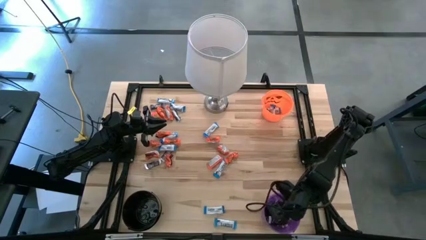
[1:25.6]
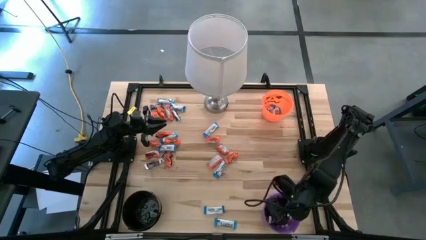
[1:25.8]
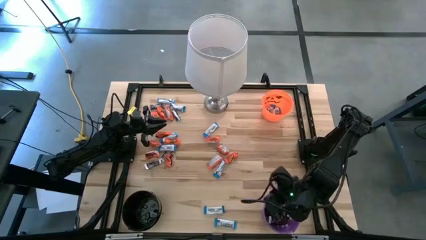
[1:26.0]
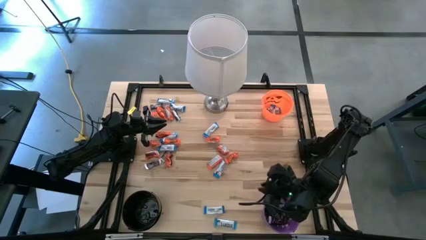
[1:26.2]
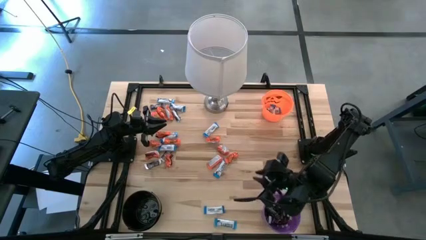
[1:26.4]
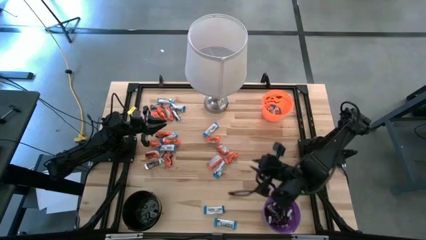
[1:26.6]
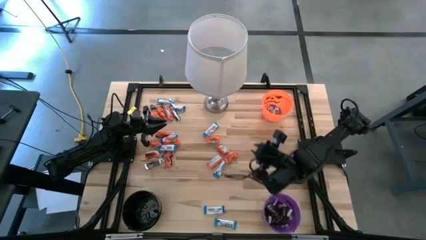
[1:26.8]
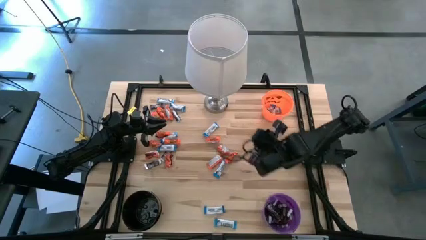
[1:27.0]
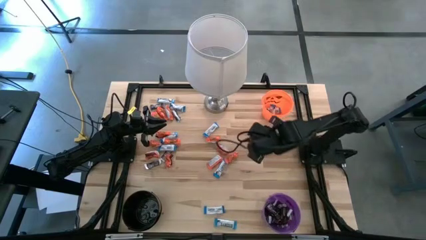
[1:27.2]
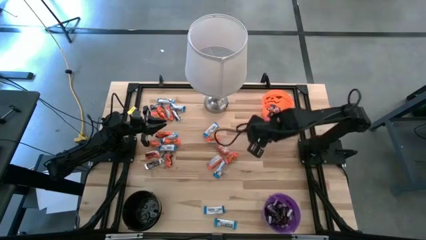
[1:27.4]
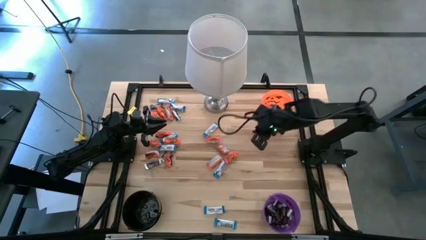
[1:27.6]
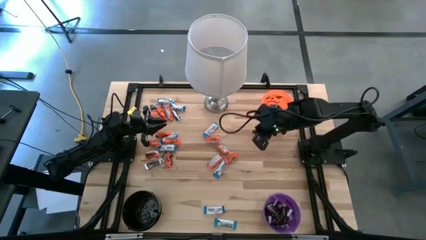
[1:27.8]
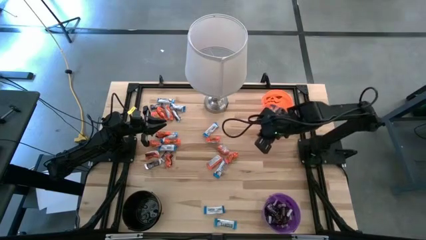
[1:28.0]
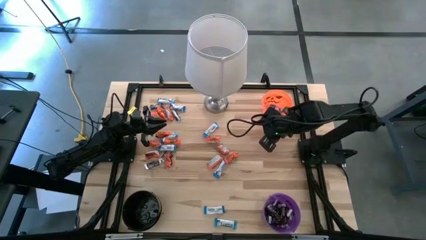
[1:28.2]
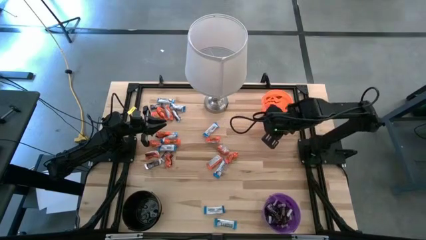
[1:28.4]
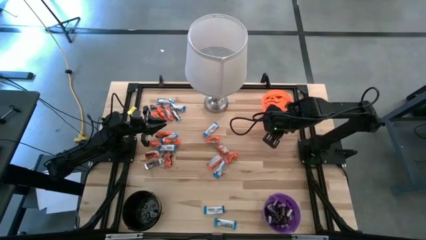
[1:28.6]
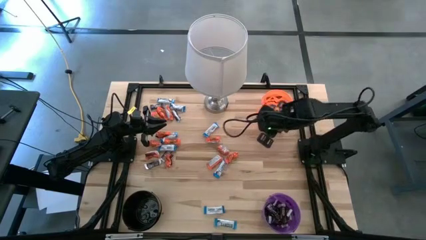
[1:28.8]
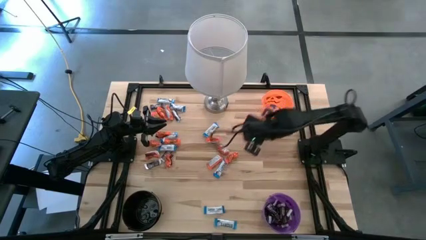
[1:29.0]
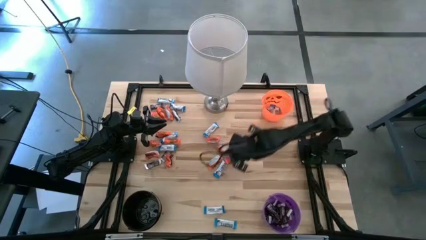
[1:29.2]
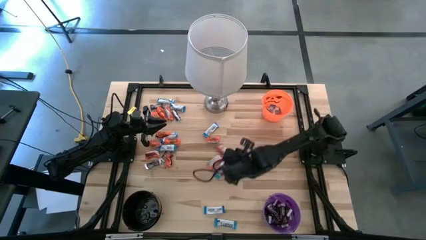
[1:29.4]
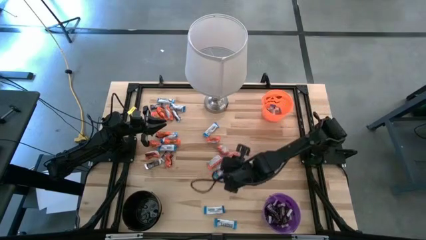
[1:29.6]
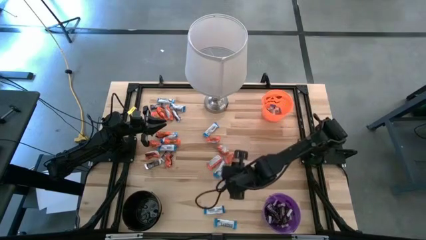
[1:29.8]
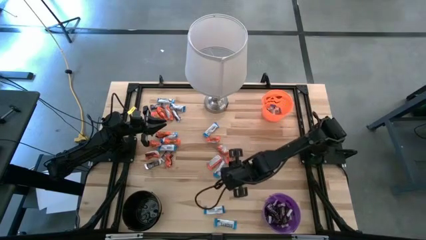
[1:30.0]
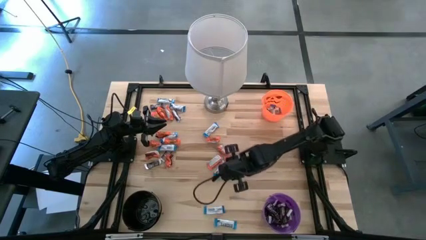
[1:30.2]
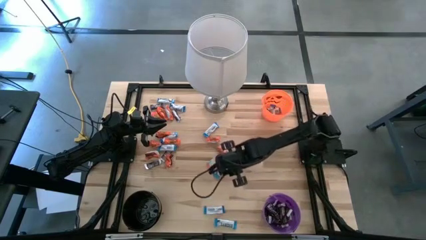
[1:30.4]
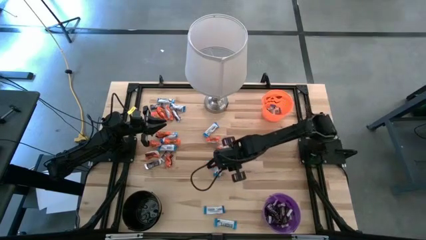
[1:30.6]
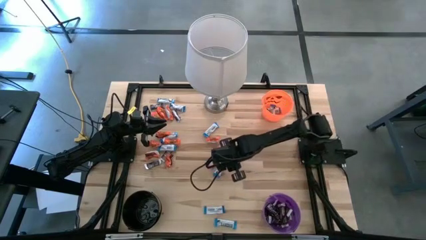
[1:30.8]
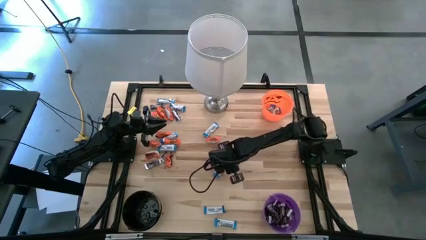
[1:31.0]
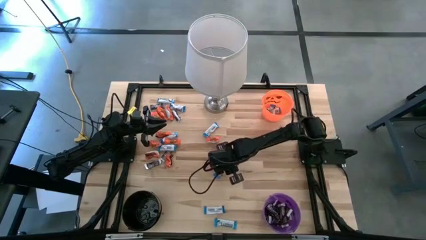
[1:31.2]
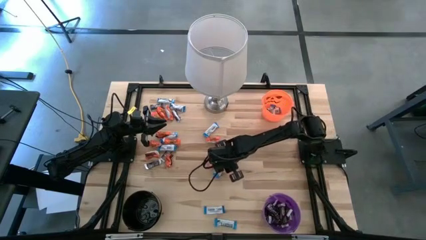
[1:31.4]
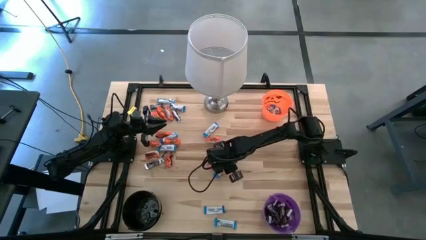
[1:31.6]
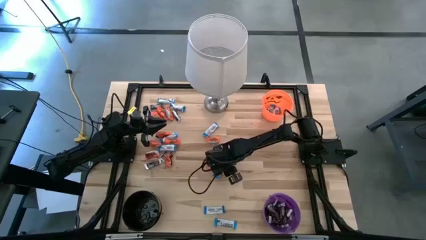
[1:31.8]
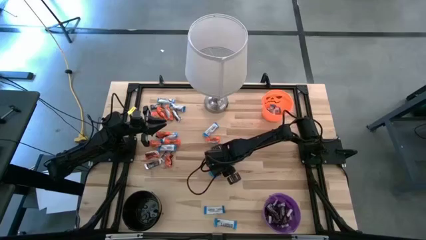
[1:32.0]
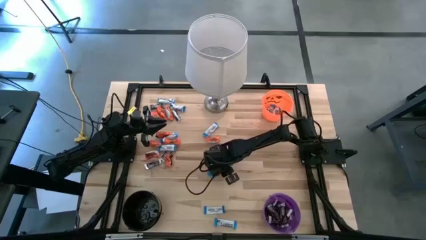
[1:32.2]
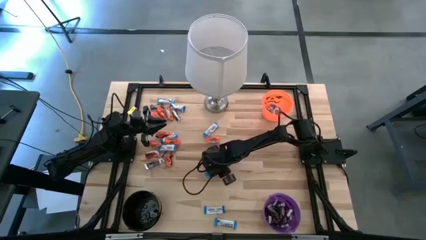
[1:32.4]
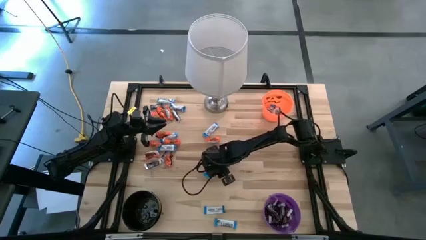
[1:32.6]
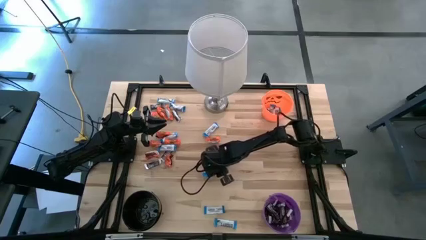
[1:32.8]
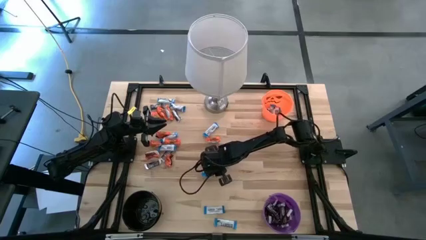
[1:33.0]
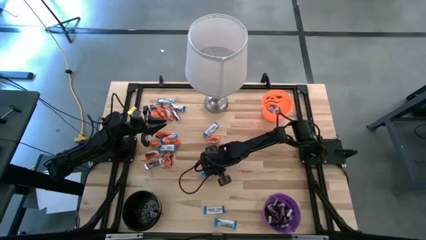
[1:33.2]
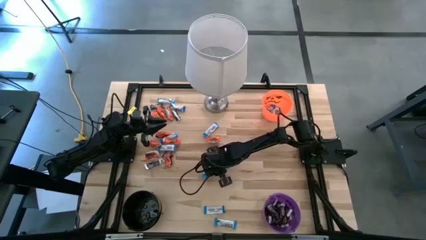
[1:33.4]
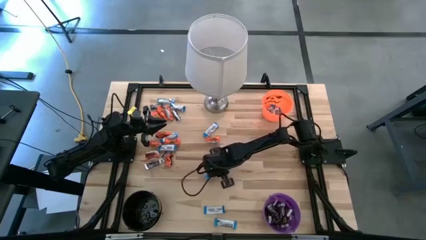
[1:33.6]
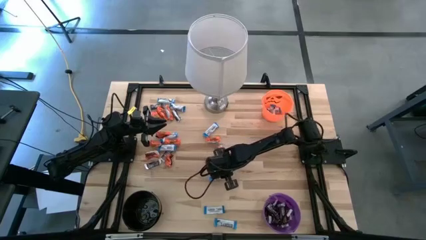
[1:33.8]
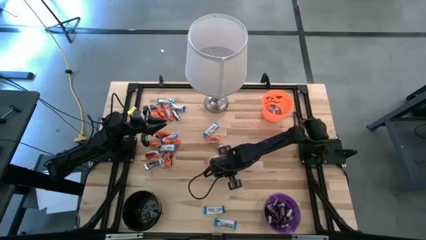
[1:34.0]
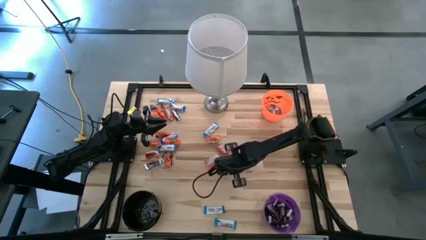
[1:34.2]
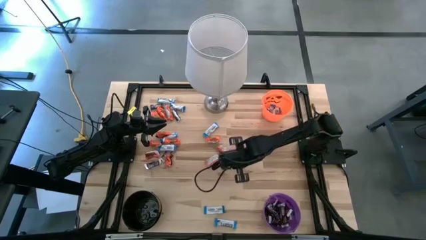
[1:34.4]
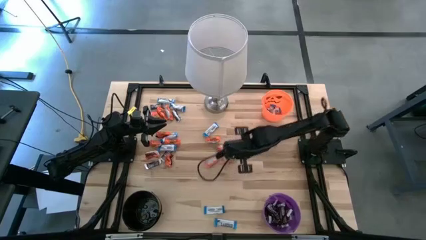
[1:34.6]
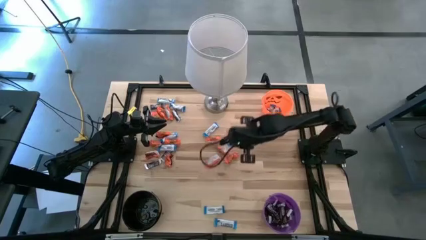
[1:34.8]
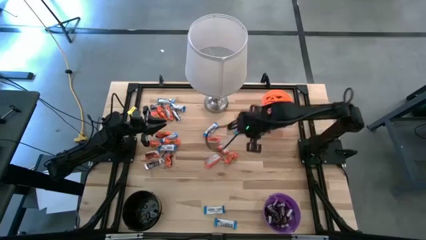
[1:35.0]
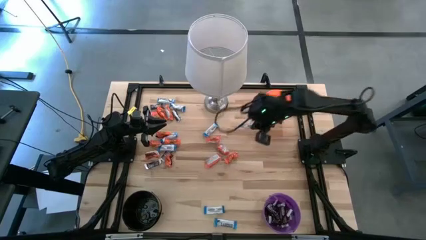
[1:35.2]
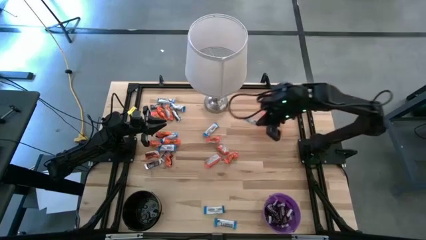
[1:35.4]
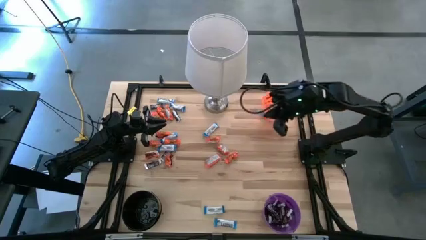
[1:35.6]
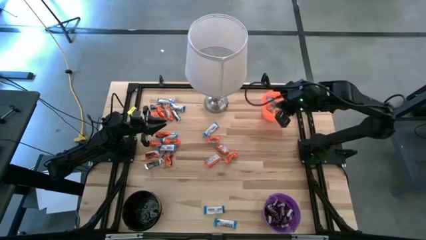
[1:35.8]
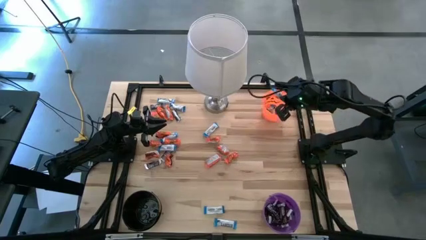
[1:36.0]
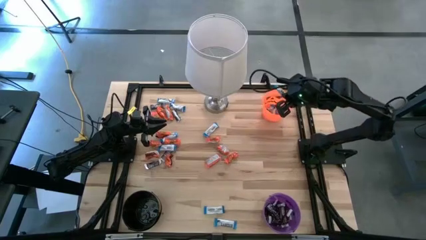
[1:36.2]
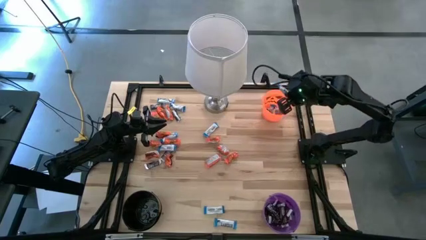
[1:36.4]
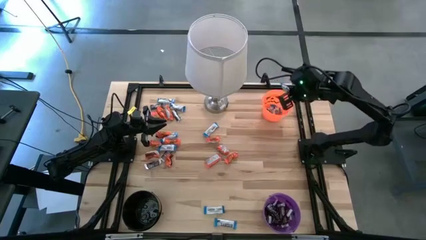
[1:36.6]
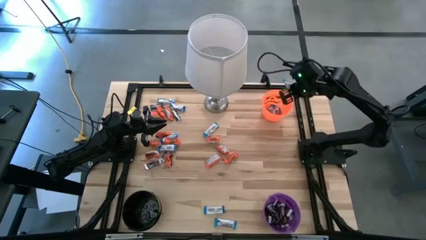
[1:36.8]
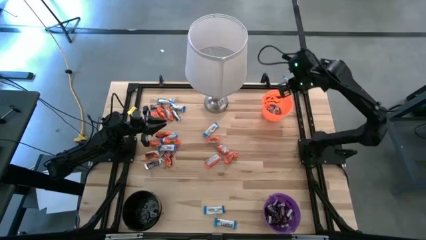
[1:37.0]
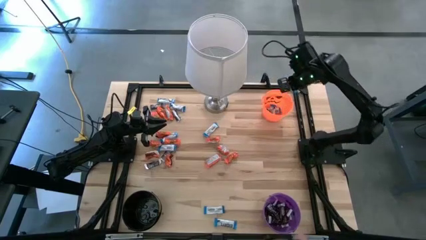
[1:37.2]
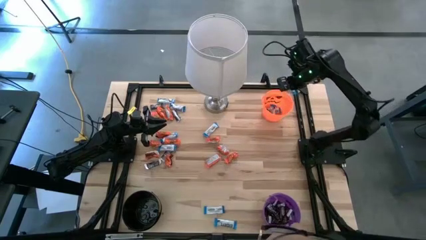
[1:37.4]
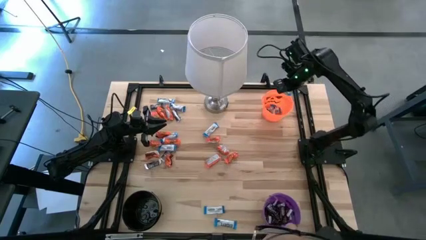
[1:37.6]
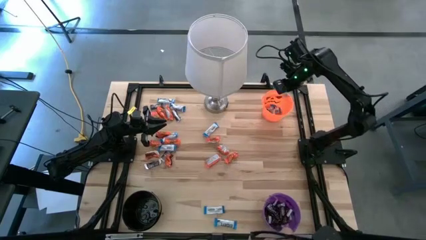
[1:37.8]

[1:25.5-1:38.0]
Task: Sort candy
Put the white chocolate bar into the orange bucket

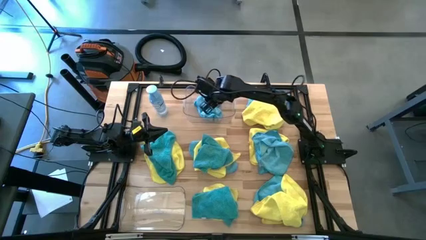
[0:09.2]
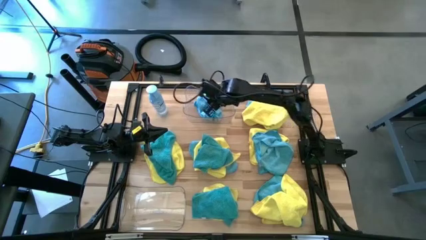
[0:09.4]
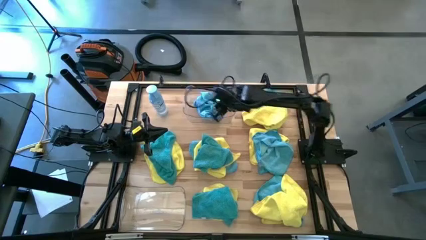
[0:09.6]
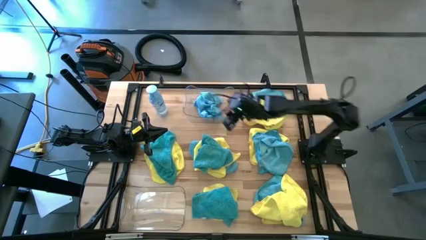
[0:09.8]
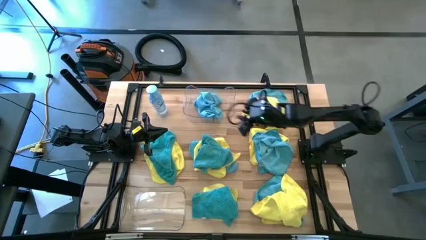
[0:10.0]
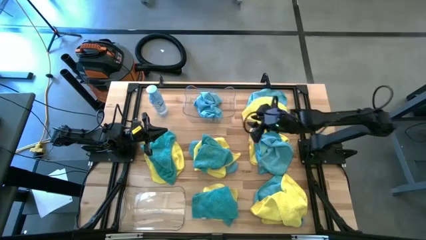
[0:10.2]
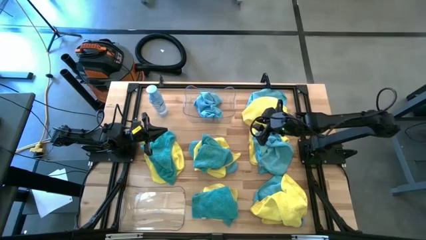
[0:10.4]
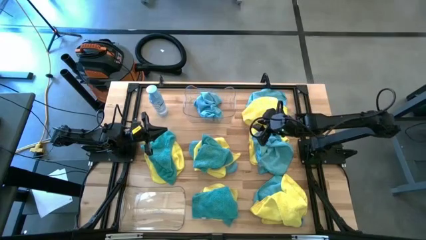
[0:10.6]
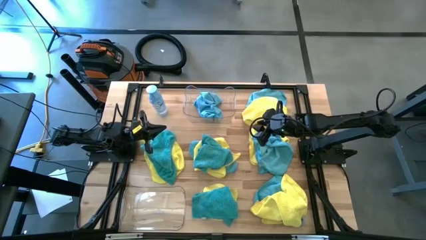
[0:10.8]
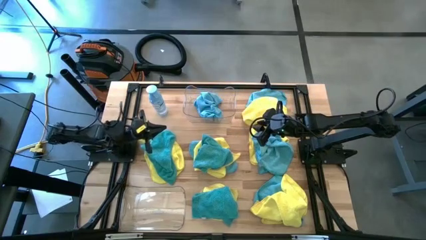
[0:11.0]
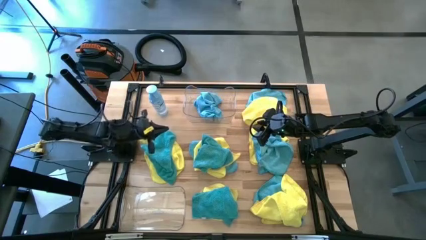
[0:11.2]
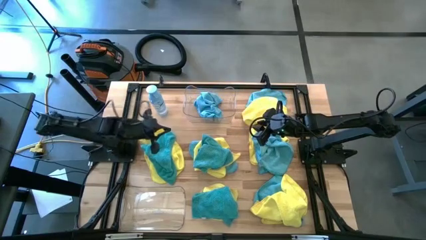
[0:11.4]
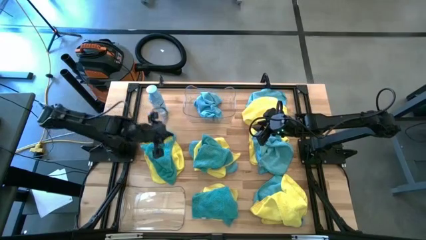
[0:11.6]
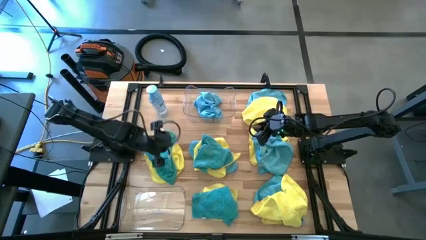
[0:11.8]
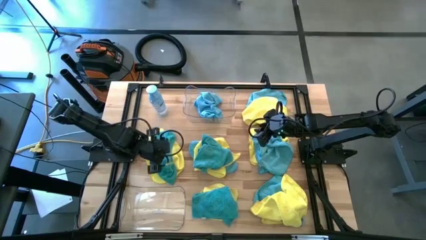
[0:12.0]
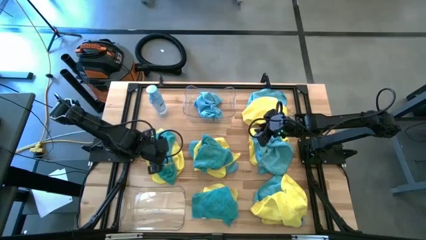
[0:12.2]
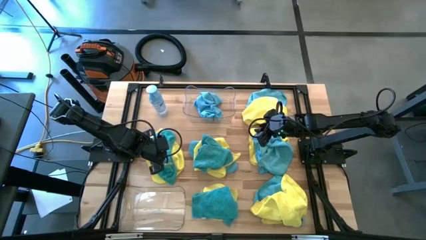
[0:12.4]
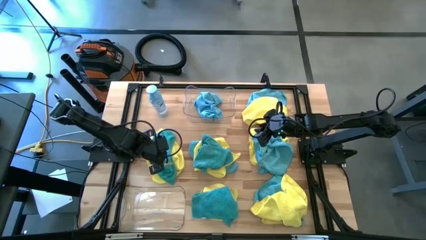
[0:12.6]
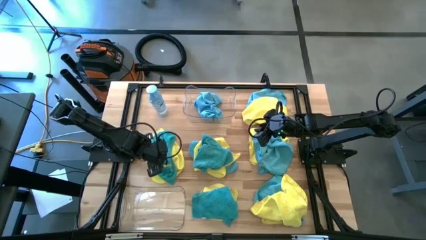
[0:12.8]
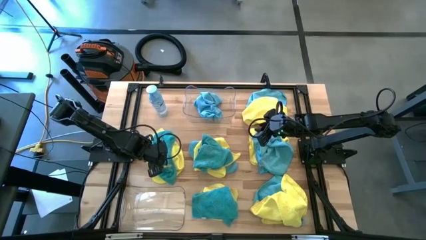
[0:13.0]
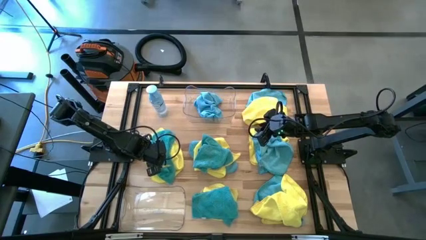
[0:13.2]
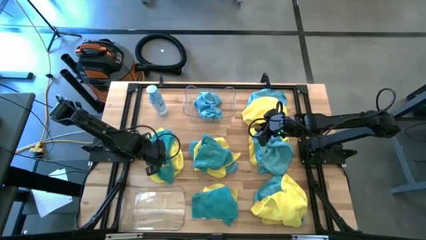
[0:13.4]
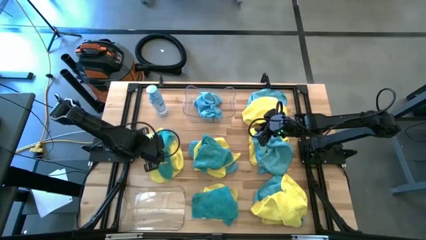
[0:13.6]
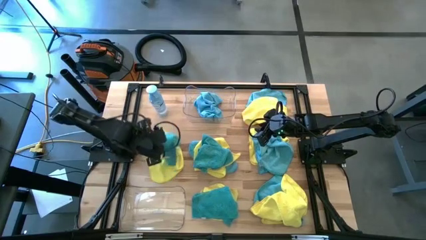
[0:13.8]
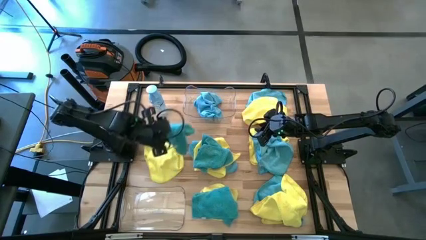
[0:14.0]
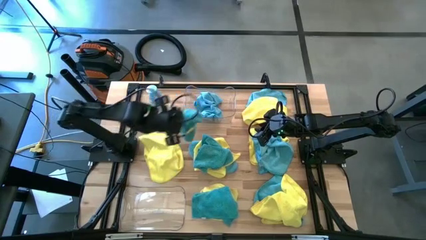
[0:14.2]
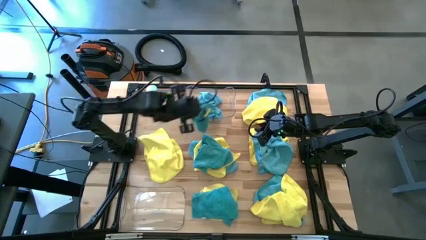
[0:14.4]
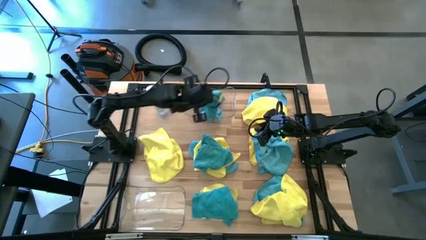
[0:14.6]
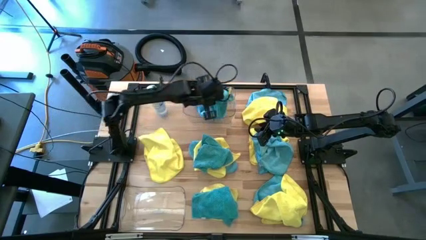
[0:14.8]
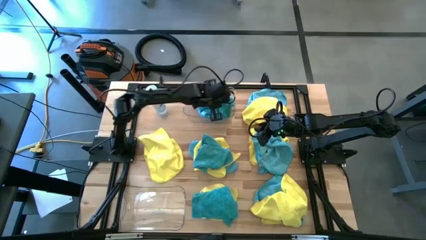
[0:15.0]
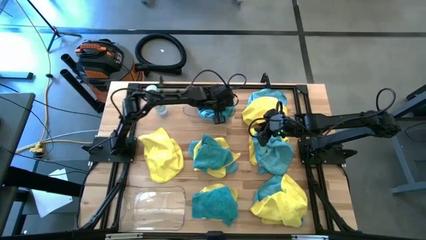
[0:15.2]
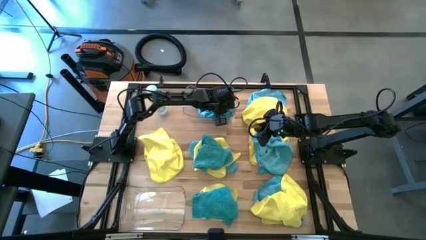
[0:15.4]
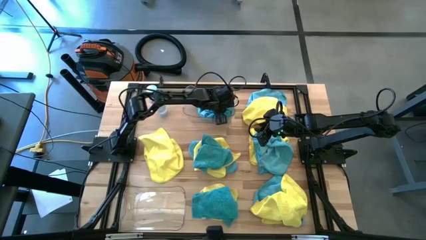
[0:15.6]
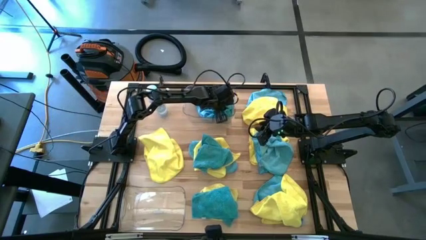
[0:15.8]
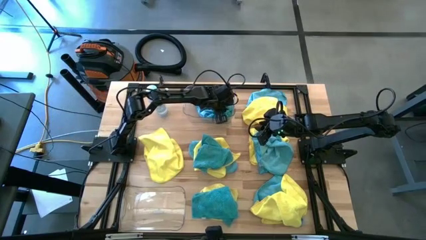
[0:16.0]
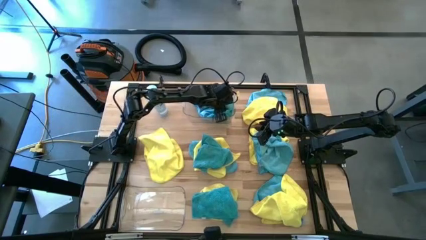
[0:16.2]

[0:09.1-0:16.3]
Task: Sort microfiber towel by color & place in baskets
Put the blue microfiber towel into the top transparent bin
